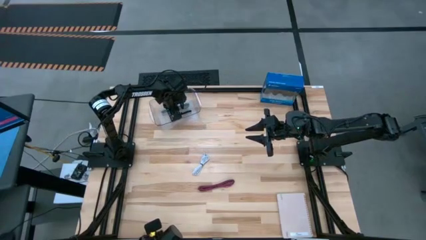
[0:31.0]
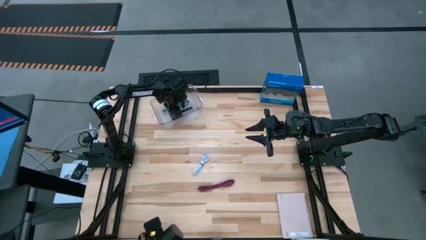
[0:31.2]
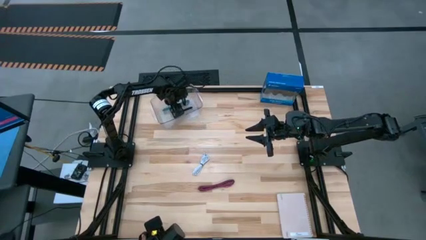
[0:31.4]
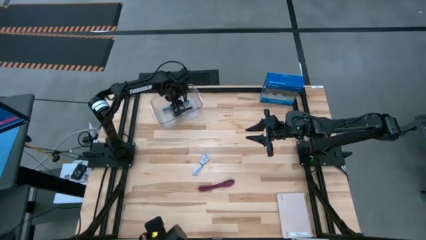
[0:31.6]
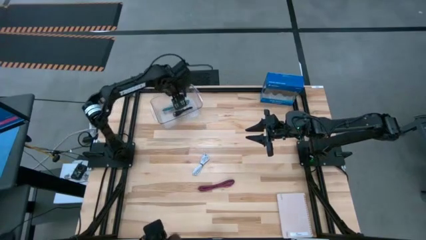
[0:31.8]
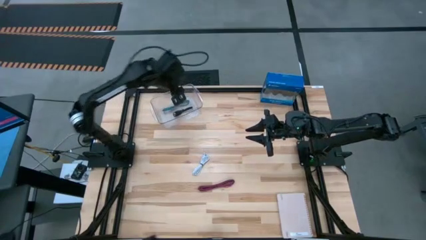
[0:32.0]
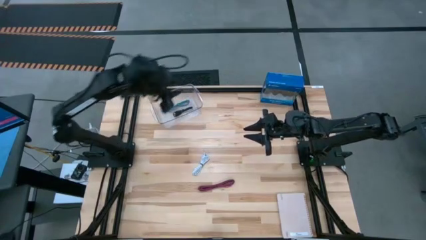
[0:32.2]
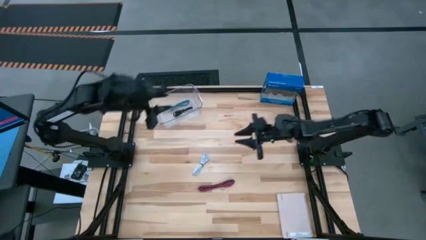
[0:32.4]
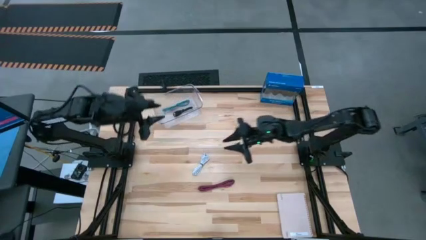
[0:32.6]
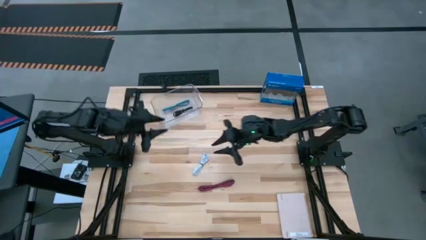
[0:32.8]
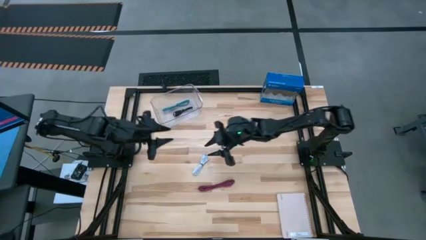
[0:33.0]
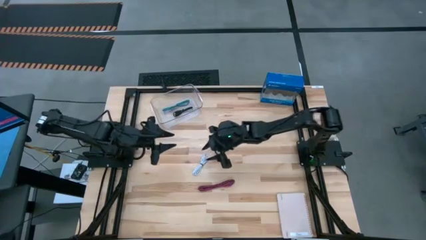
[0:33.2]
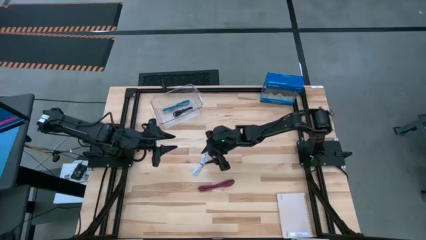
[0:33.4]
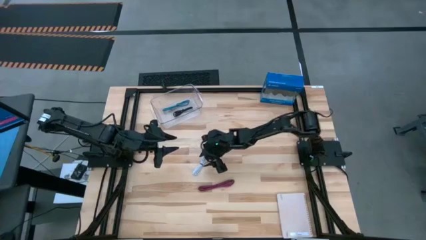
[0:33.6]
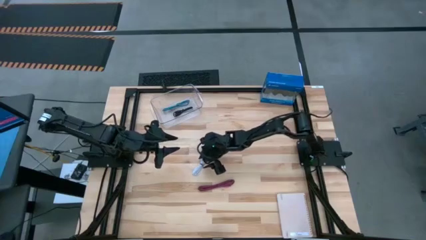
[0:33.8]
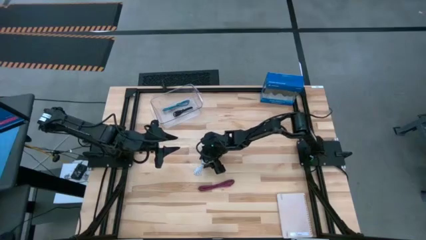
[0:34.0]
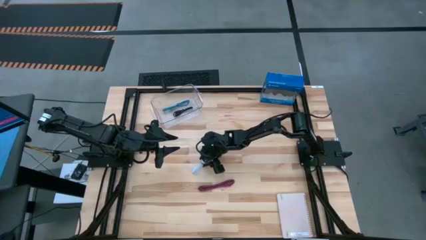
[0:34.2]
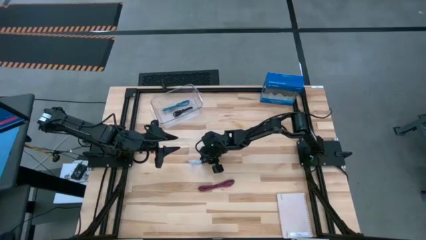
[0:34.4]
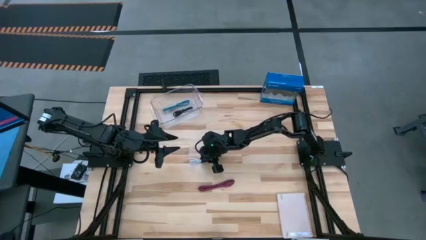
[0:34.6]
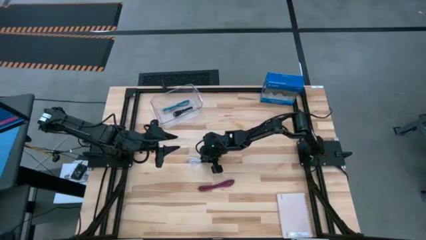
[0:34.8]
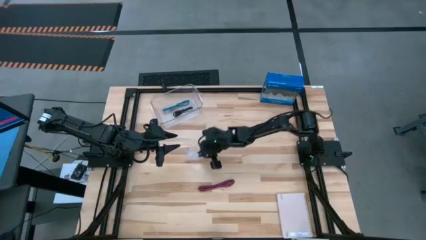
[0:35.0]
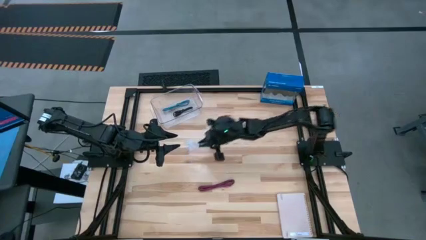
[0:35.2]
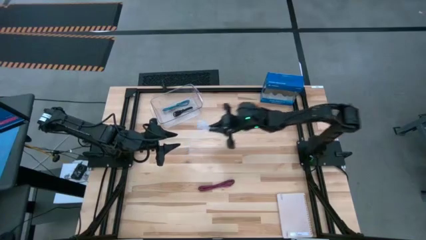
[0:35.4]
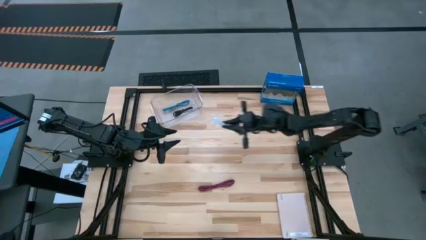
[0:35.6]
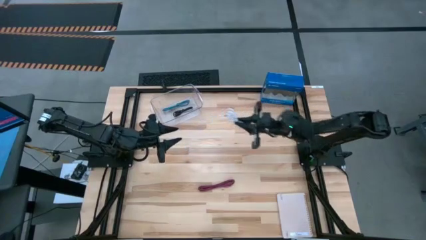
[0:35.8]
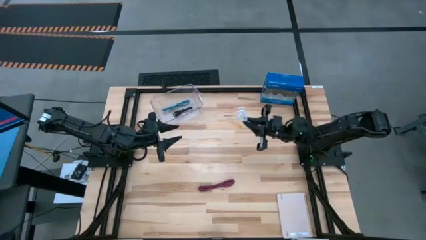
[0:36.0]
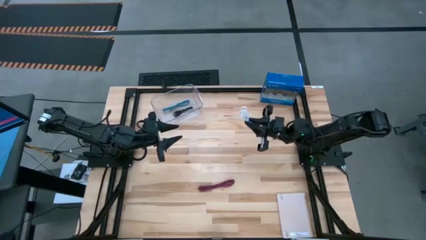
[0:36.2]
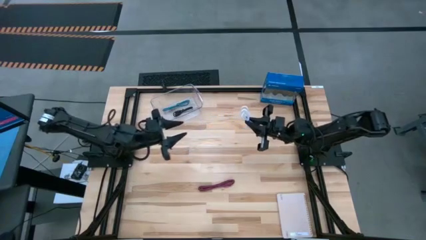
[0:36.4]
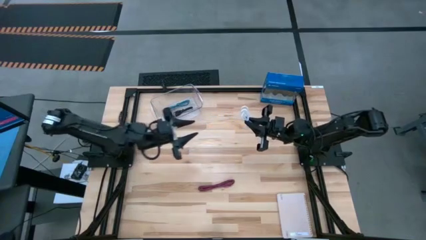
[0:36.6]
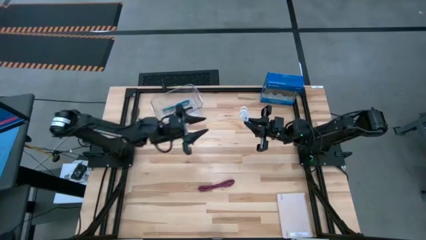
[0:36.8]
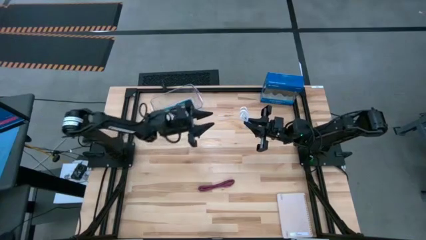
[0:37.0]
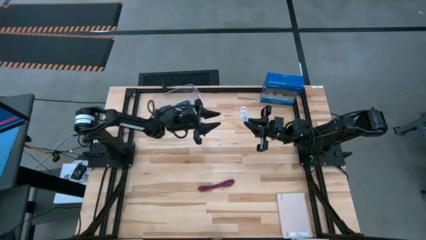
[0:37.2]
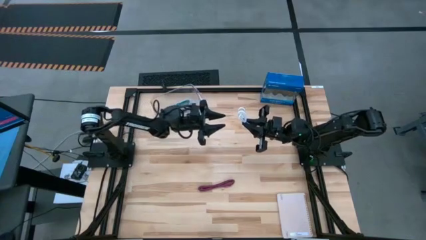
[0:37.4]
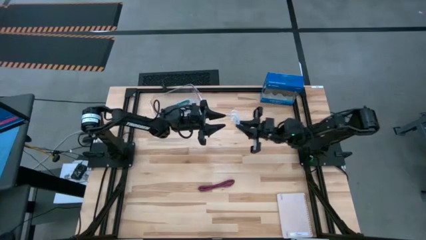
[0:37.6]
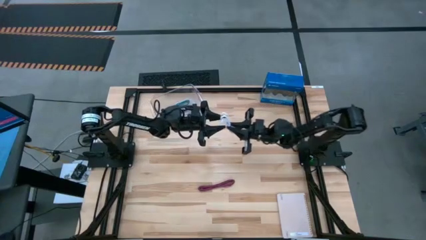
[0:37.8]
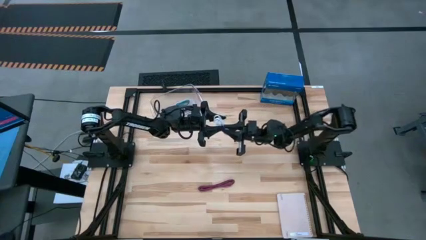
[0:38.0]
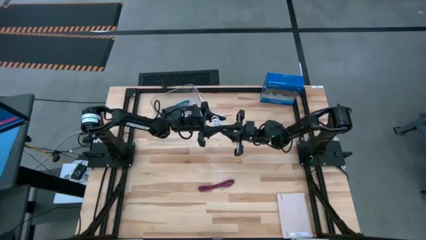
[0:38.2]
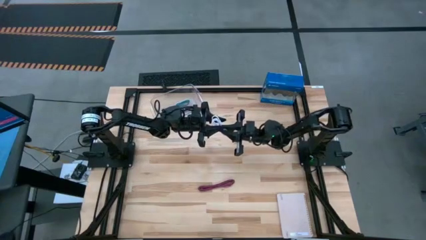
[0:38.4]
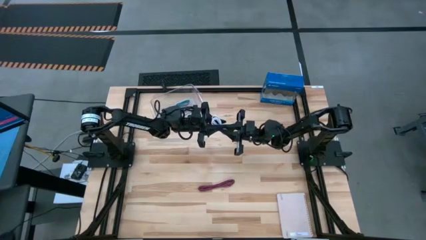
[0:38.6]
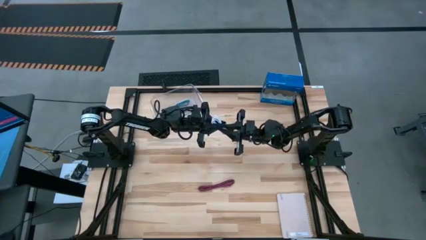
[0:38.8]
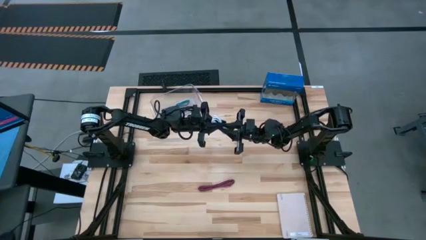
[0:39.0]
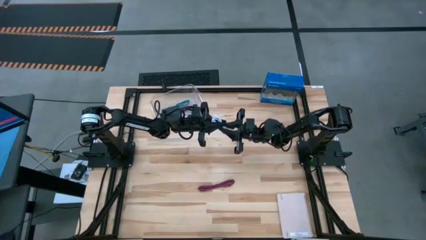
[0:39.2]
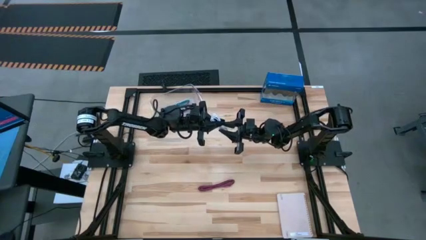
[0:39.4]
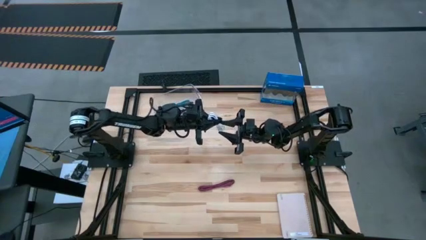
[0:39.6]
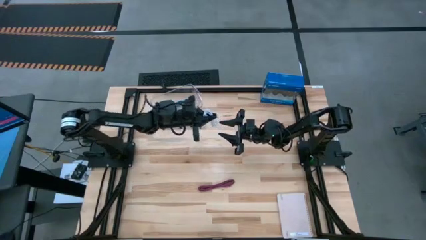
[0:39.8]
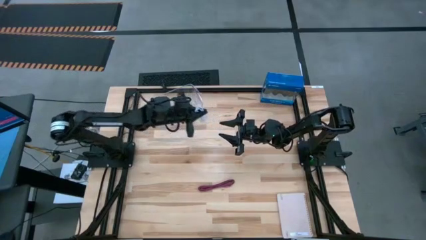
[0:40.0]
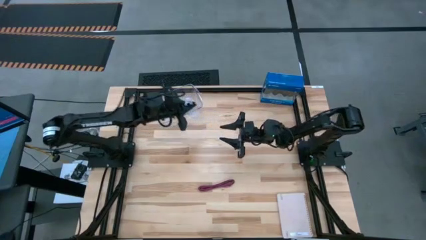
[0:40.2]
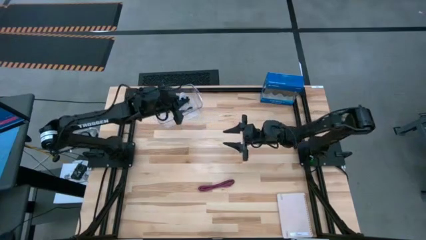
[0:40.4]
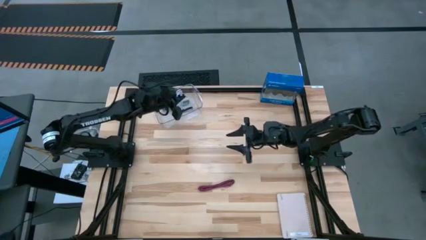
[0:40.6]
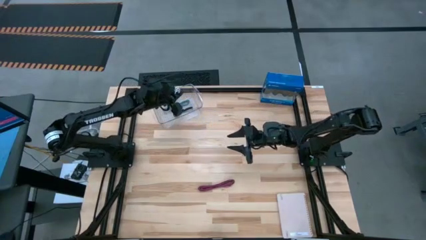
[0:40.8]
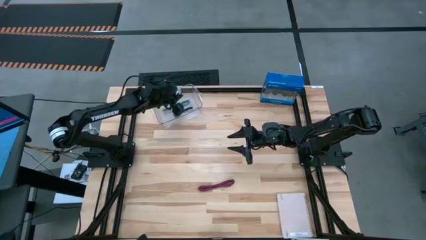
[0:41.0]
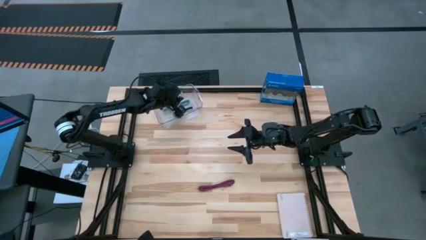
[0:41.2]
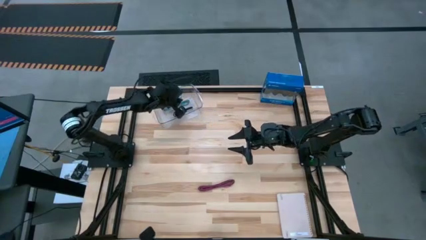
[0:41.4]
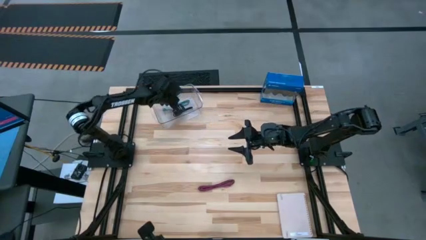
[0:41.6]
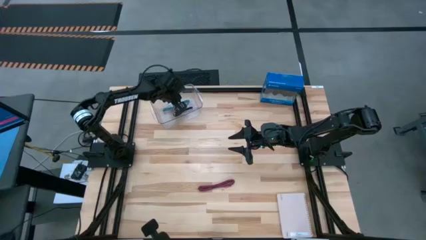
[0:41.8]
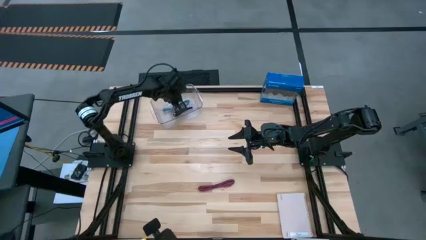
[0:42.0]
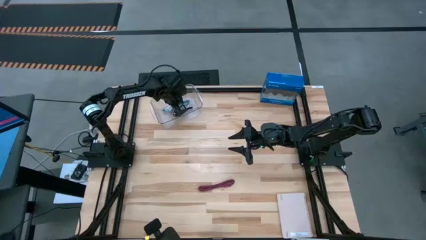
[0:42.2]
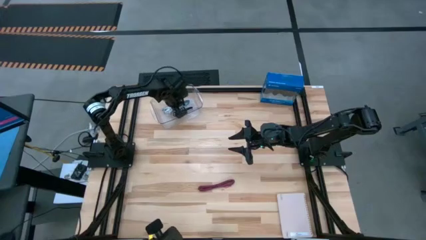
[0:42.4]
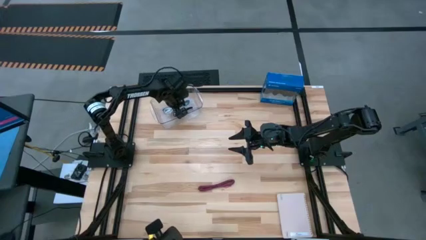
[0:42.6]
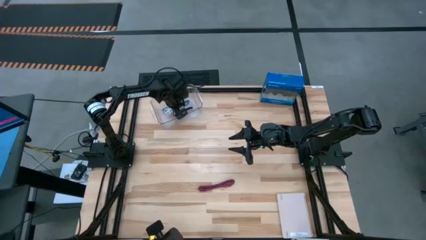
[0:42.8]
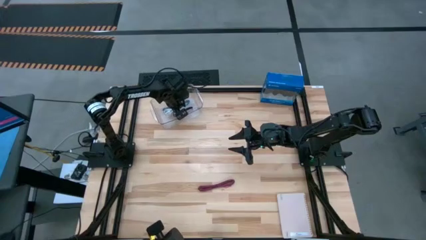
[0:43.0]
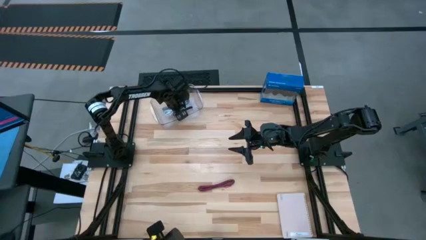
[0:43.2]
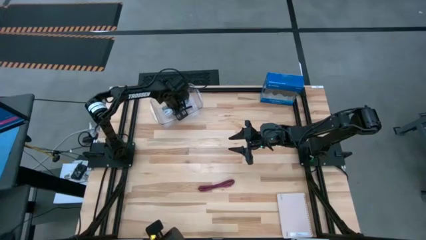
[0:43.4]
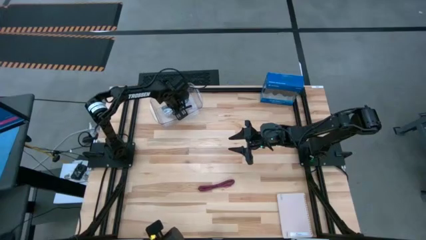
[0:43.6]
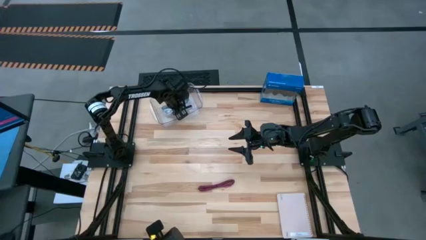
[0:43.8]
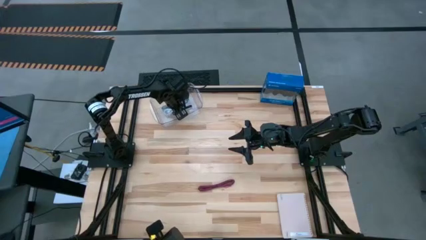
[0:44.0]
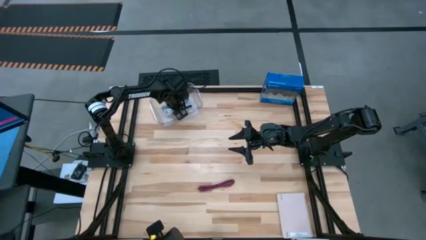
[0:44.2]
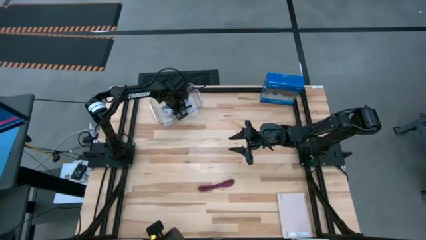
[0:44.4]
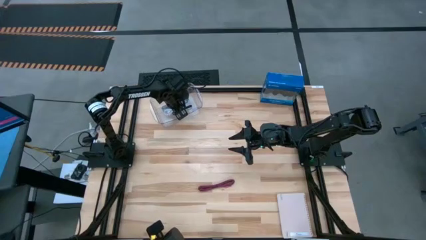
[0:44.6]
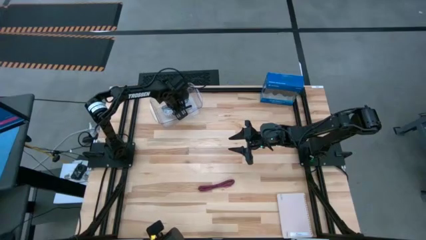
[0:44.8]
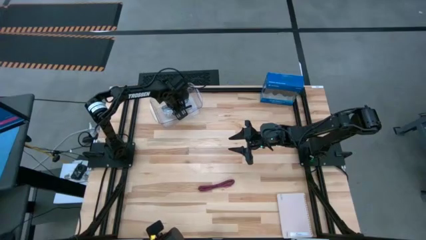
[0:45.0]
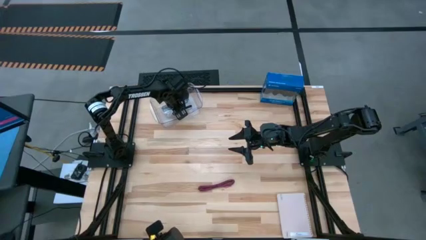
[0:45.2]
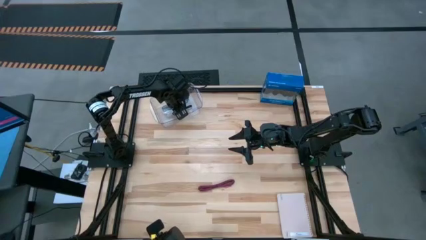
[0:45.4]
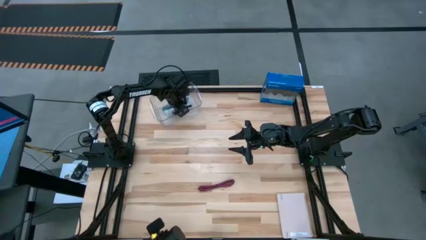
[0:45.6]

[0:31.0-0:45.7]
Task: Pick and place USB-C Cables
Put the white charger cable into the transparent bin
